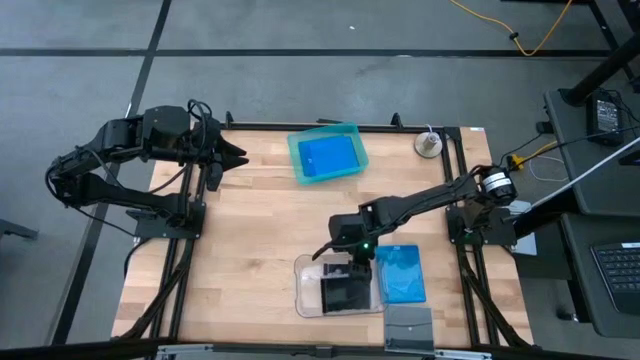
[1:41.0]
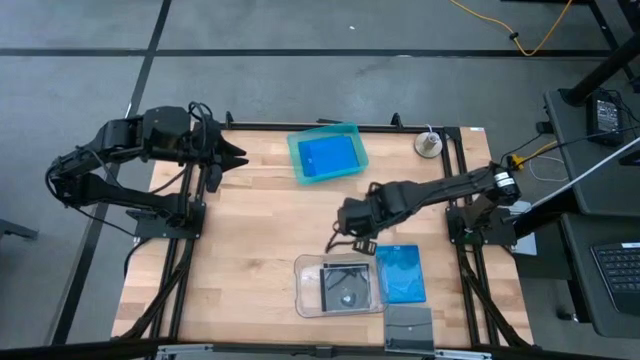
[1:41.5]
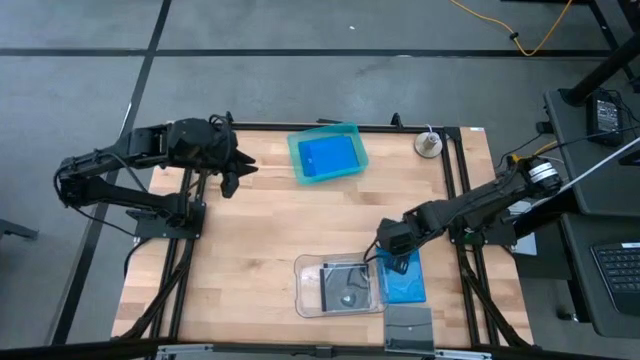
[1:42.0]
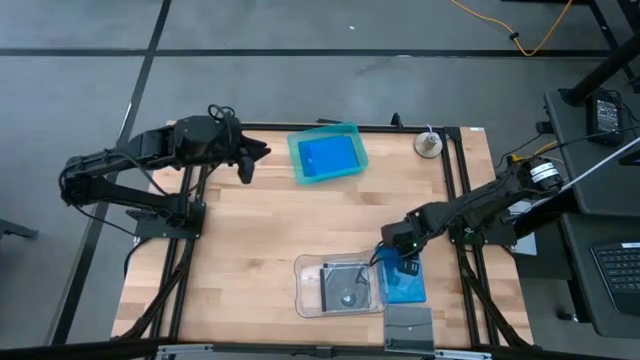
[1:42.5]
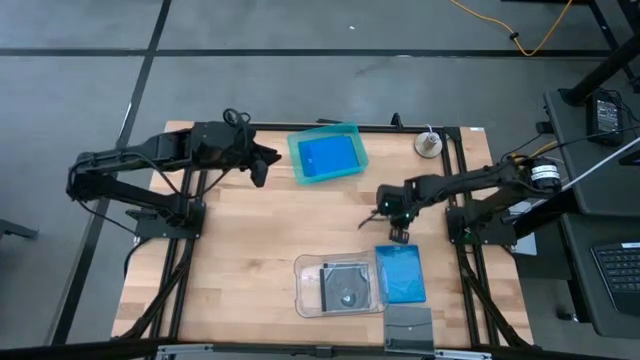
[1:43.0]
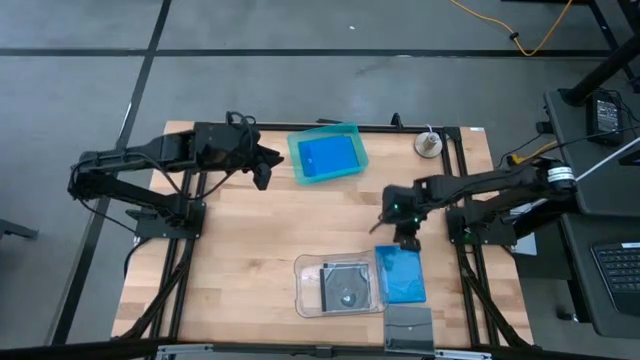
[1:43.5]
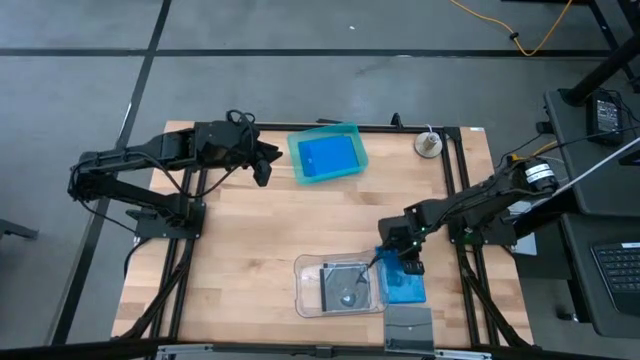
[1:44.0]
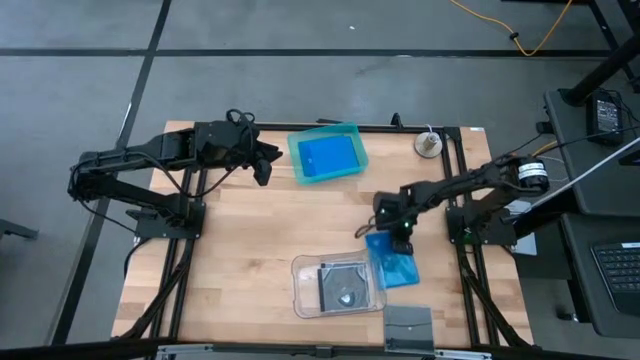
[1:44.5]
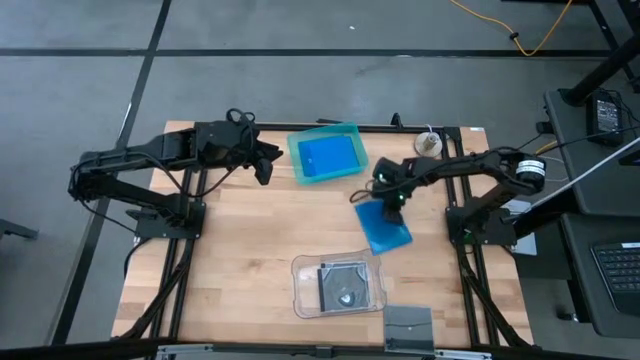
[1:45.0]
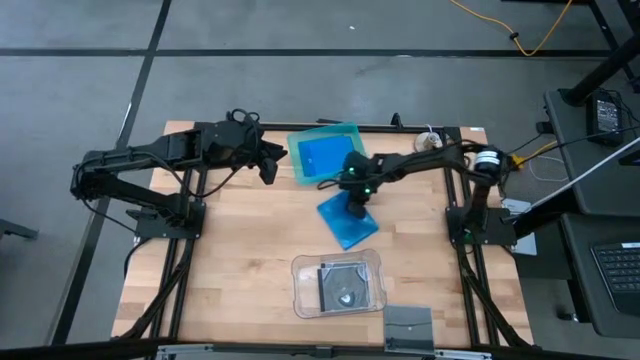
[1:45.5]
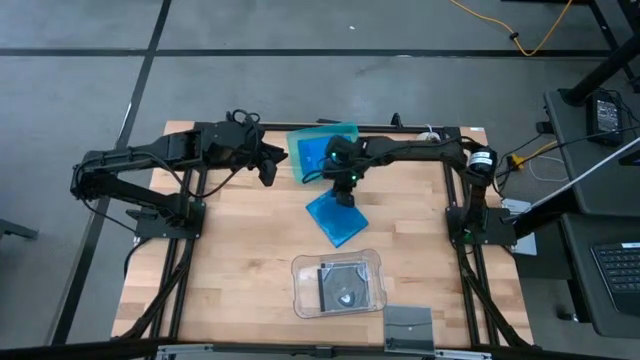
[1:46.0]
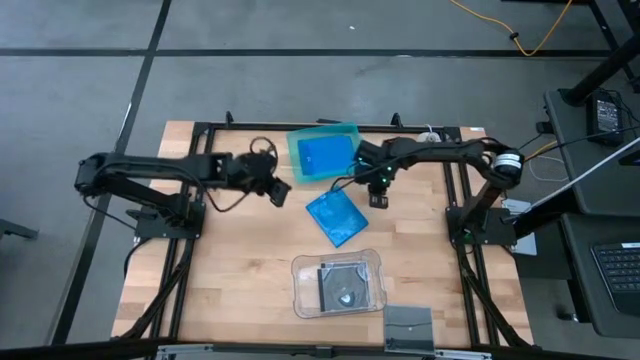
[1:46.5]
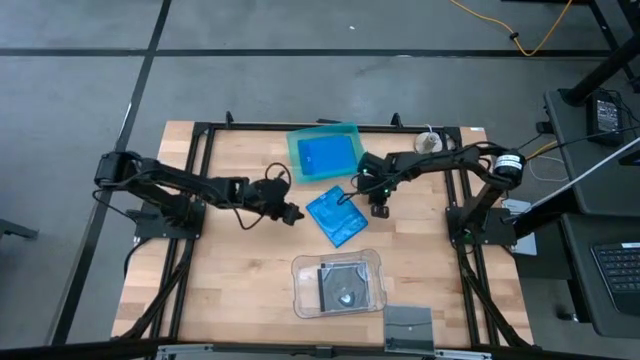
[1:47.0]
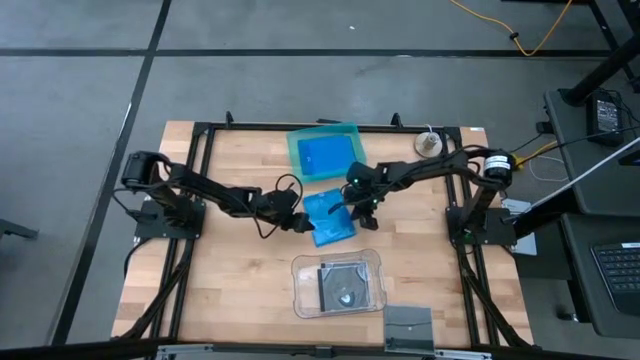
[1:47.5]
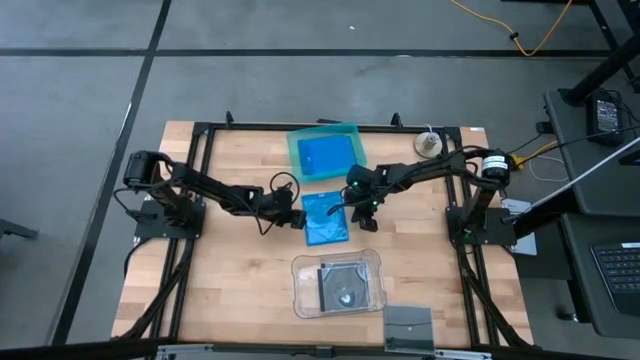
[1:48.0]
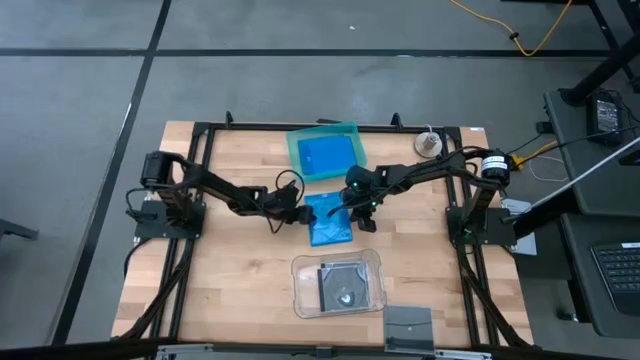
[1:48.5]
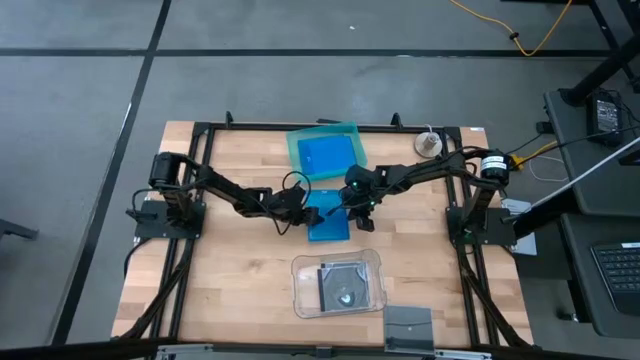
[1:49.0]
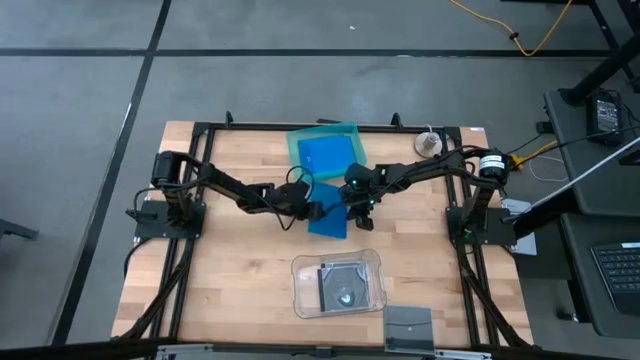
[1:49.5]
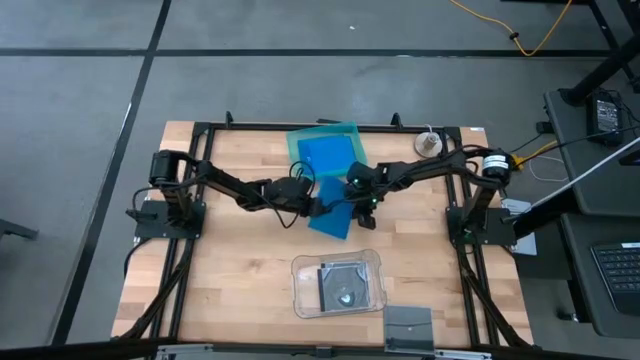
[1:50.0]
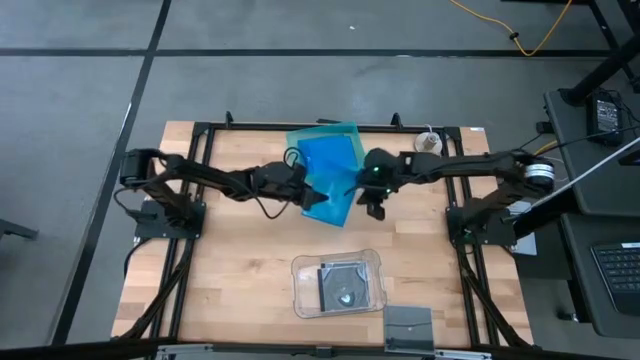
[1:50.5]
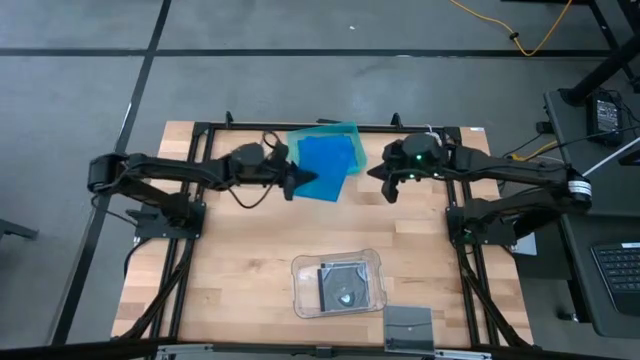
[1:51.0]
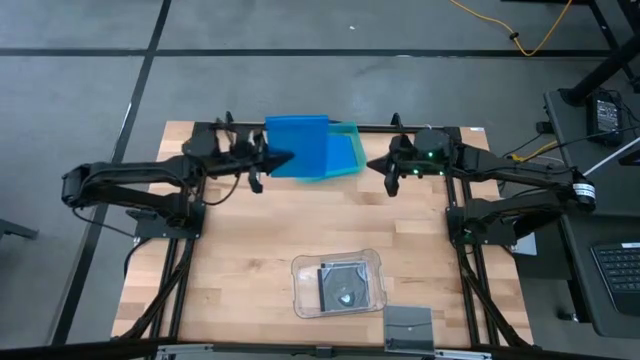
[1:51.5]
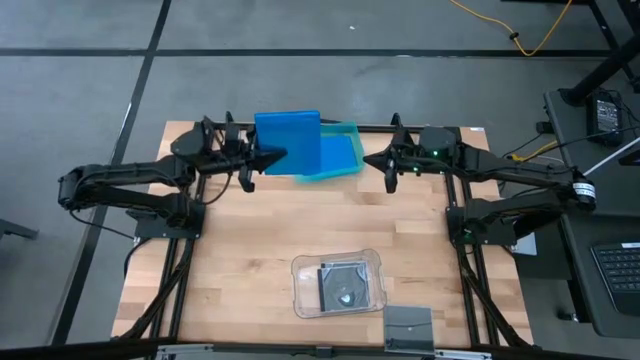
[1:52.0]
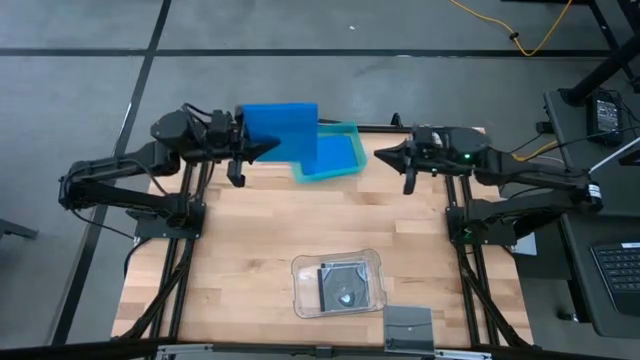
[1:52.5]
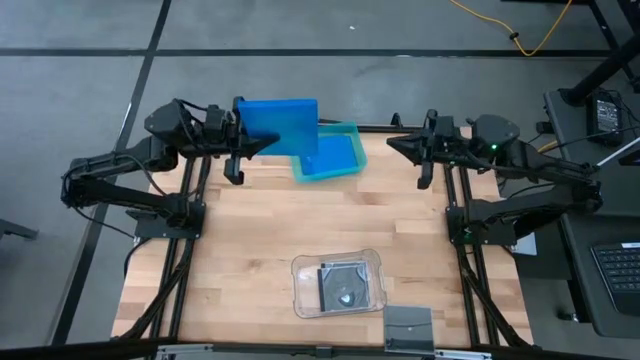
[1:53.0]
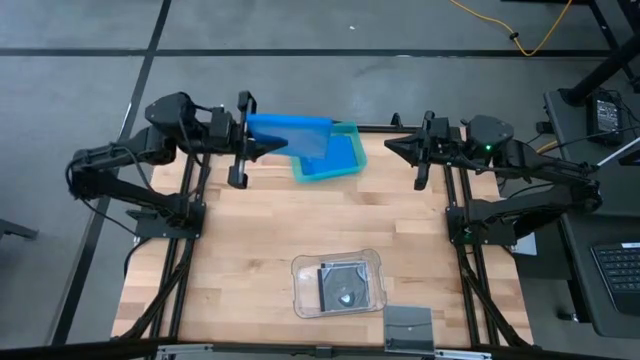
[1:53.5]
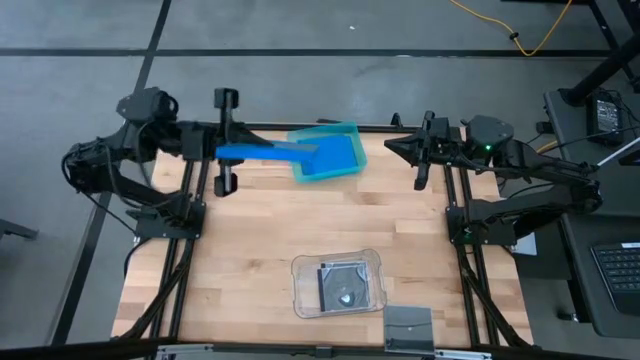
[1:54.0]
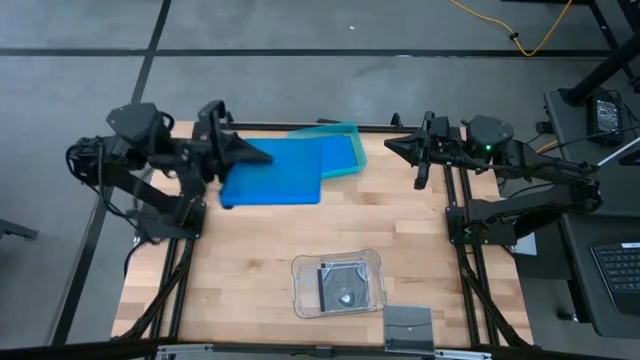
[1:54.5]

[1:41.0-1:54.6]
Task: Pick & place jewel cases by type
Put the blue CD case into the green bin

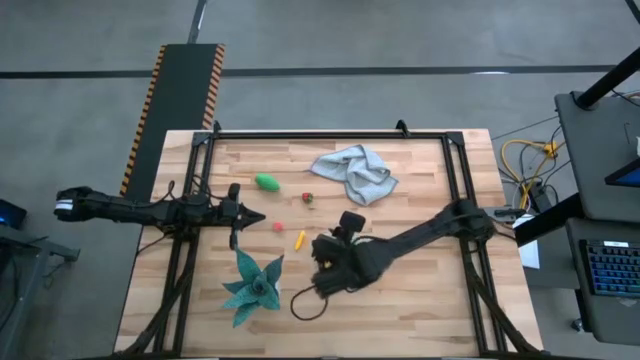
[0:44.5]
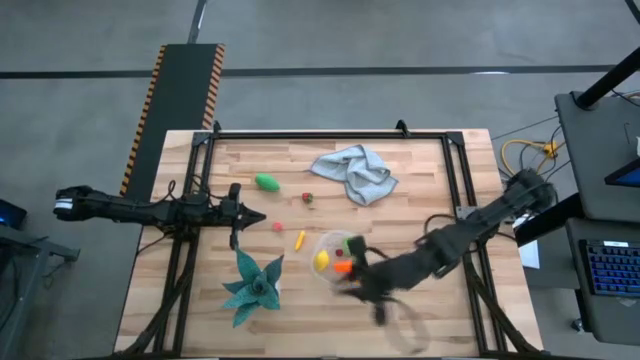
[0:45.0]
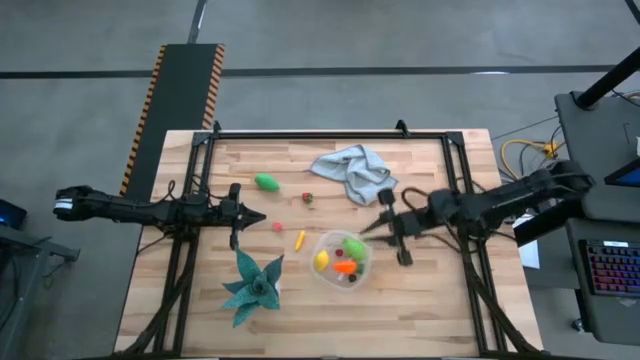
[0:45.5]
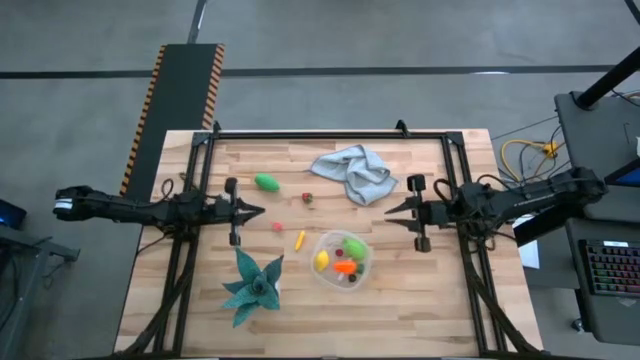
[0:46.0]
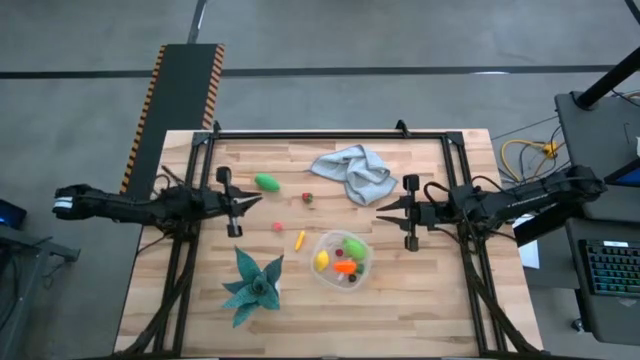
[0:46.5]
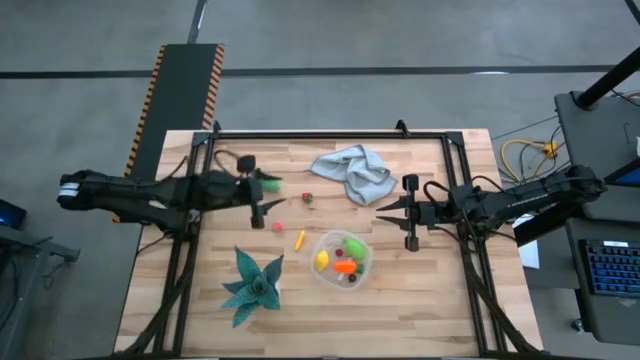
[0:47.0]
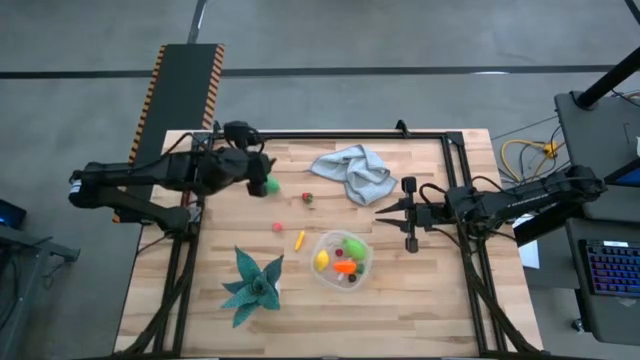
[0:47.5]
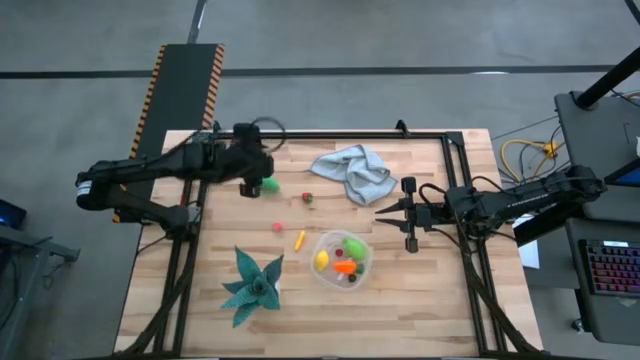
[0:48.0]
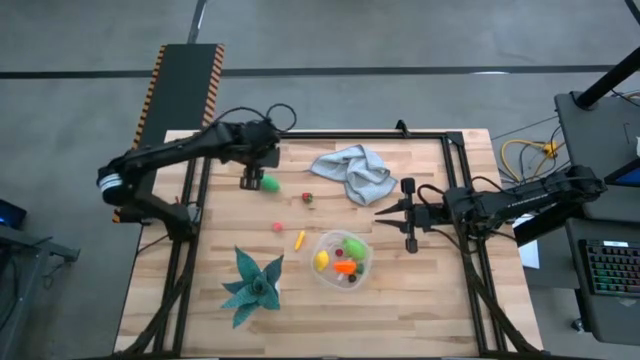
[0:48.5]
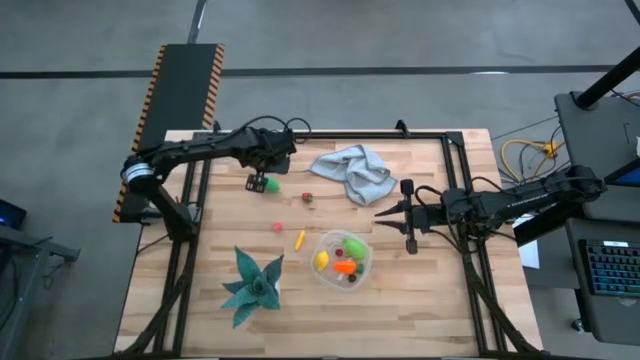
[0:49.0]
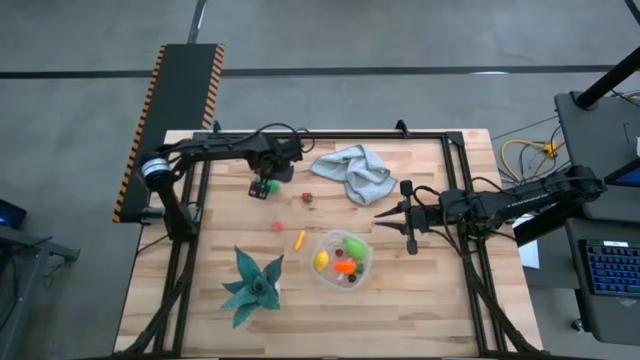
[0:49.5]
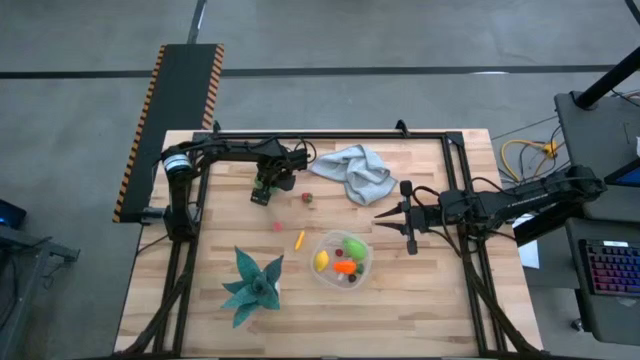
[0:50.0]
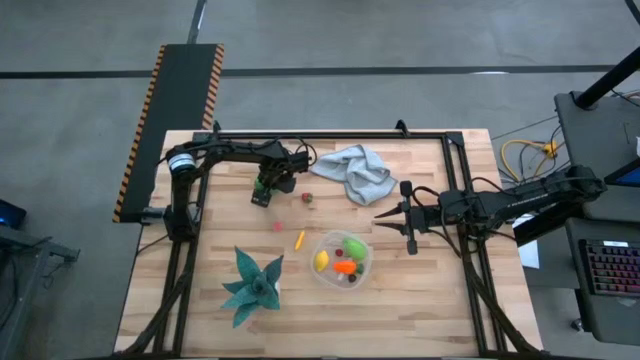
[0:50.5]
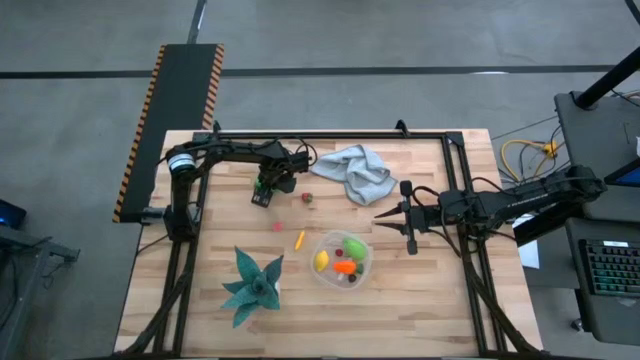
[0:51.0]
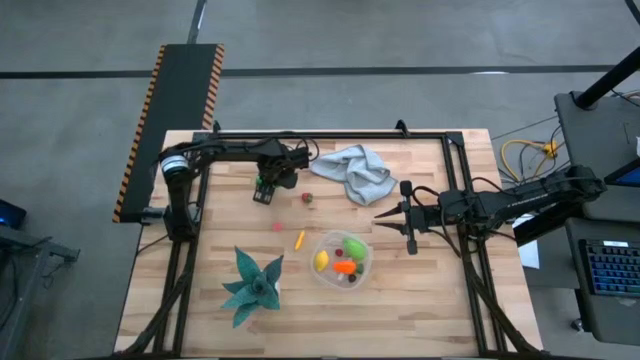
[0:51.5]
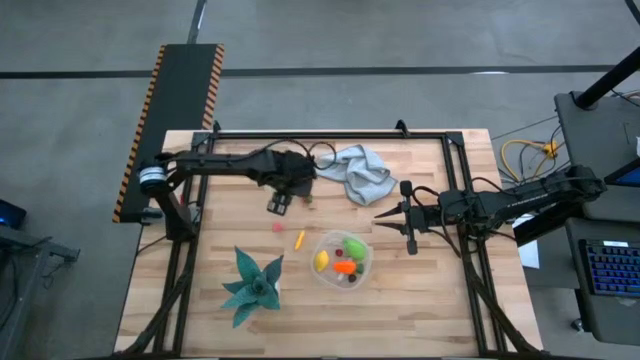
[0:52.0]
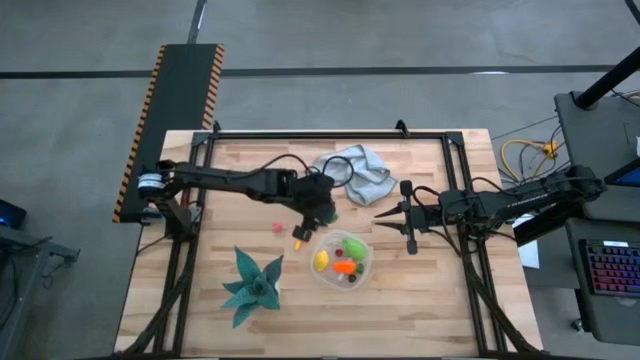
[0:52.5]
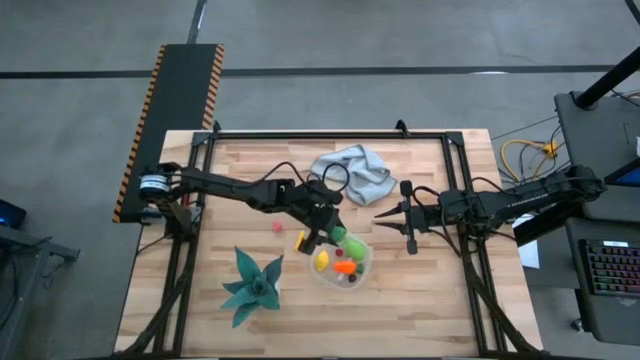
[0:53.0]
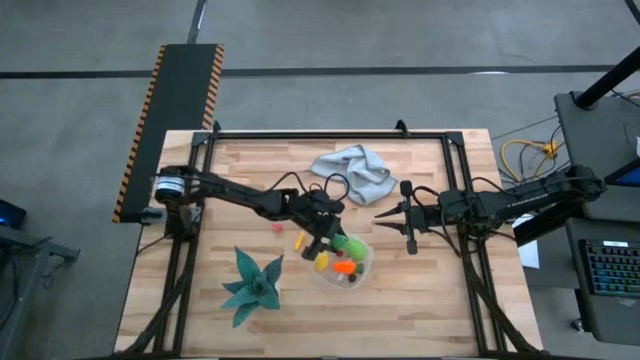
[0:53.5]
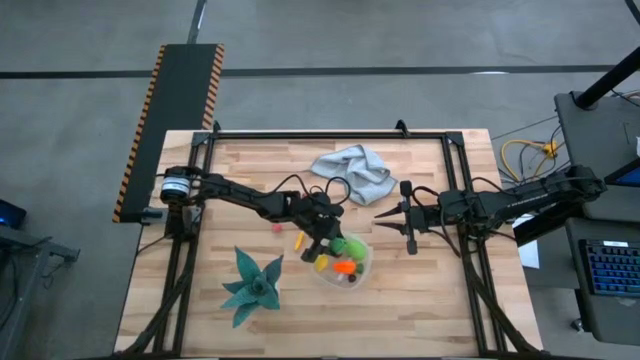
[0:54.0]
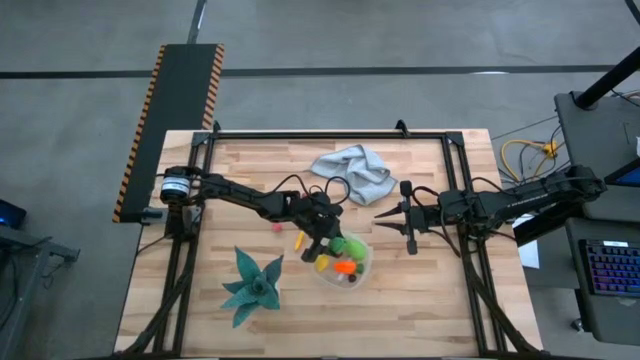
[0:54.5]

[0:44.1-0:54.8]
Task: Pick and placing Produce into tupperware
Put the green corn into the container
